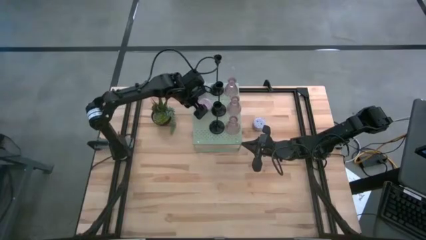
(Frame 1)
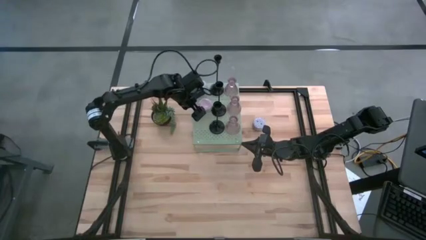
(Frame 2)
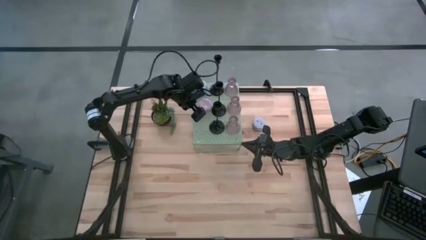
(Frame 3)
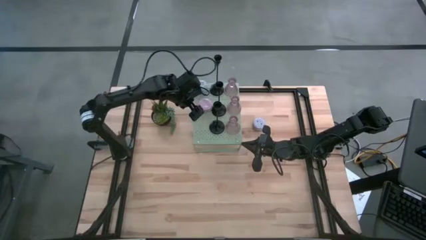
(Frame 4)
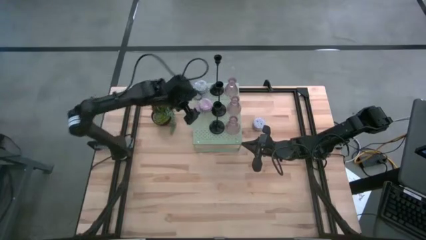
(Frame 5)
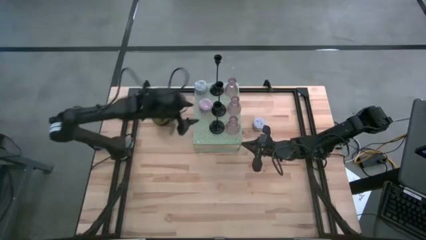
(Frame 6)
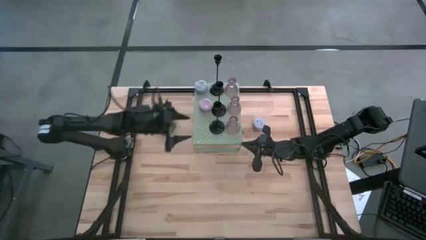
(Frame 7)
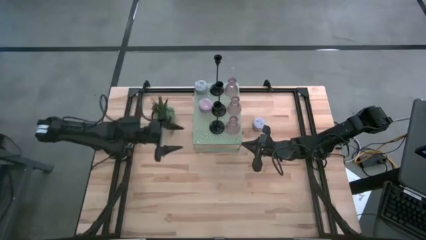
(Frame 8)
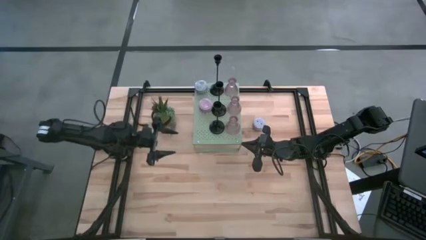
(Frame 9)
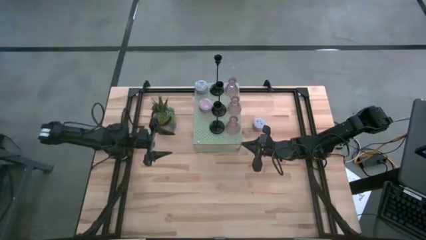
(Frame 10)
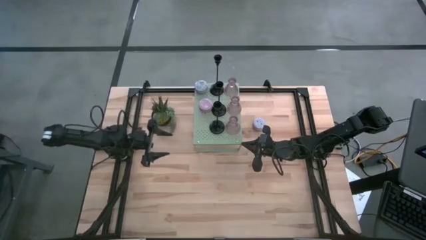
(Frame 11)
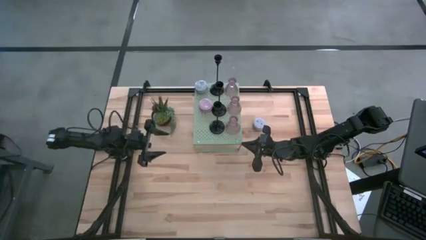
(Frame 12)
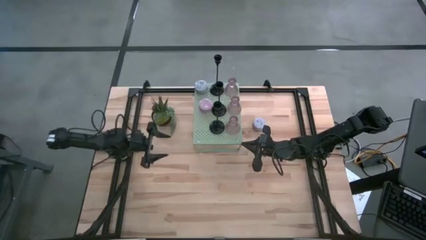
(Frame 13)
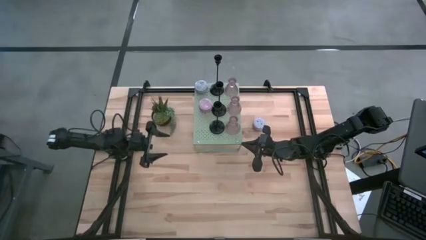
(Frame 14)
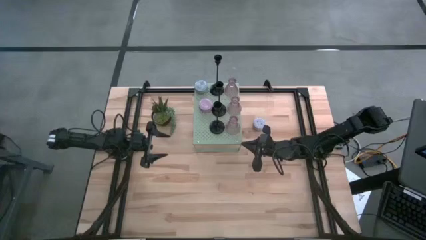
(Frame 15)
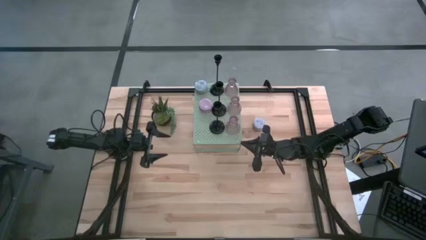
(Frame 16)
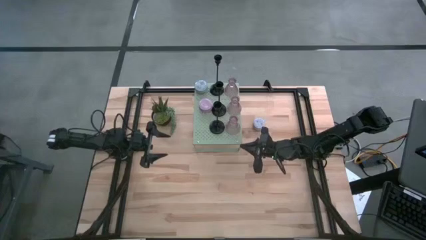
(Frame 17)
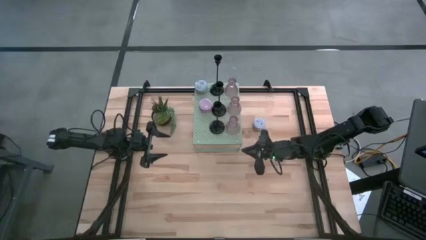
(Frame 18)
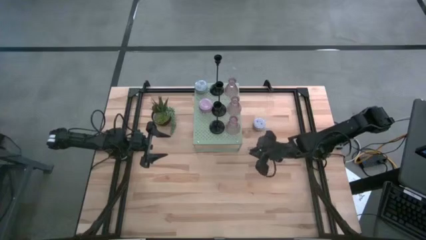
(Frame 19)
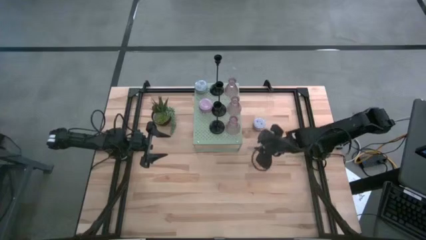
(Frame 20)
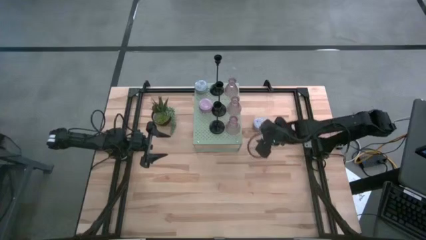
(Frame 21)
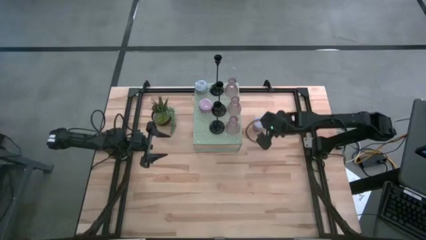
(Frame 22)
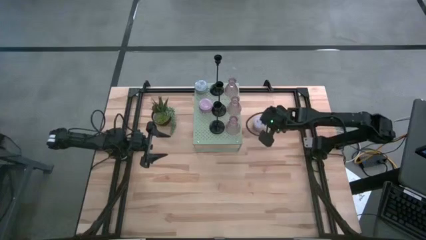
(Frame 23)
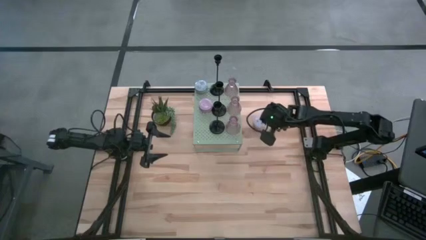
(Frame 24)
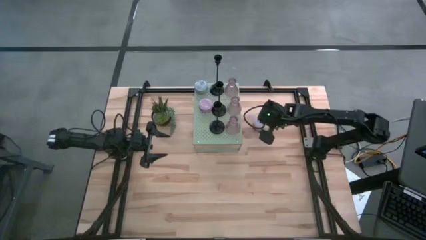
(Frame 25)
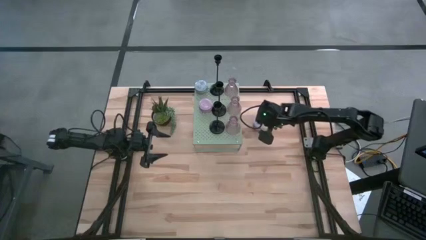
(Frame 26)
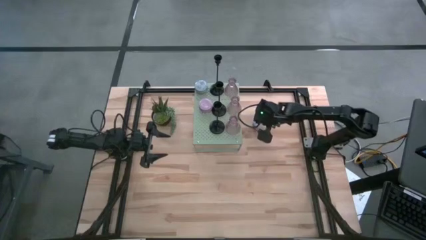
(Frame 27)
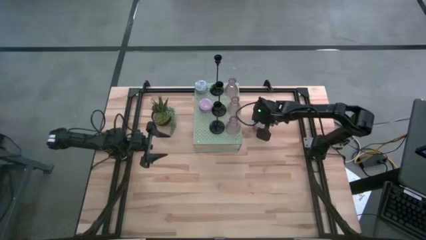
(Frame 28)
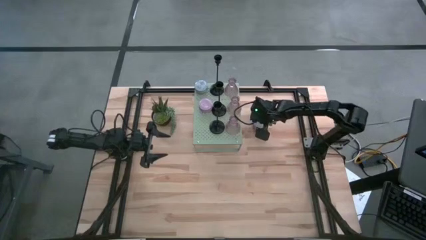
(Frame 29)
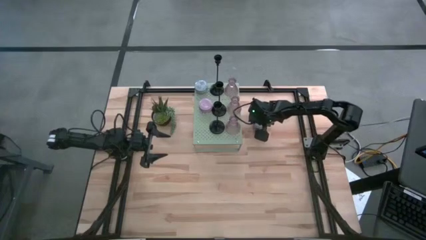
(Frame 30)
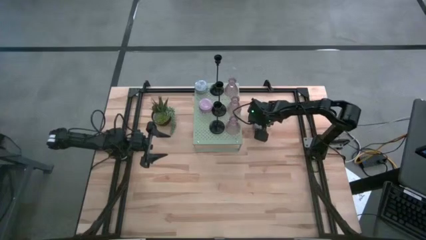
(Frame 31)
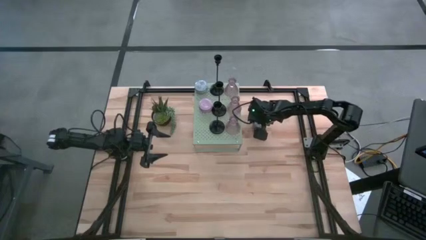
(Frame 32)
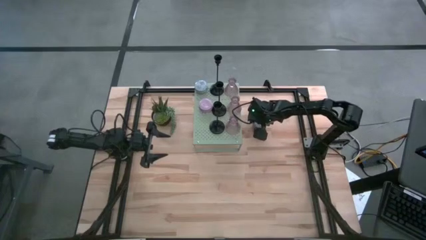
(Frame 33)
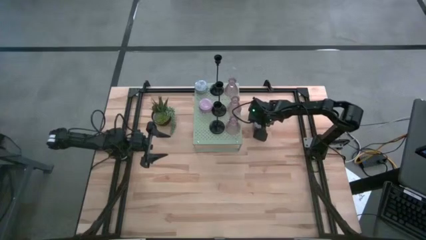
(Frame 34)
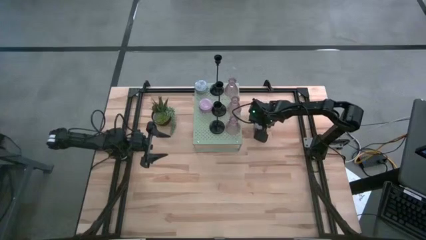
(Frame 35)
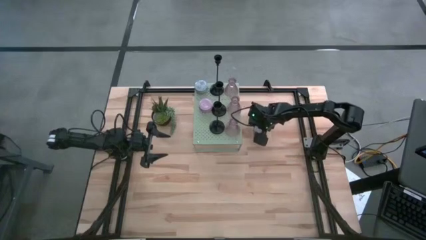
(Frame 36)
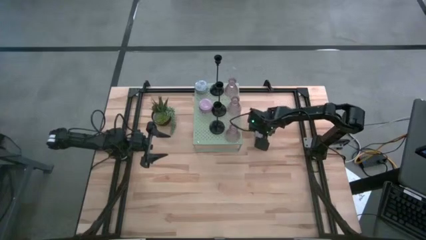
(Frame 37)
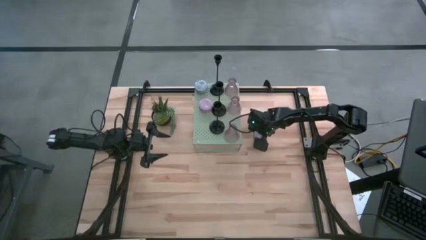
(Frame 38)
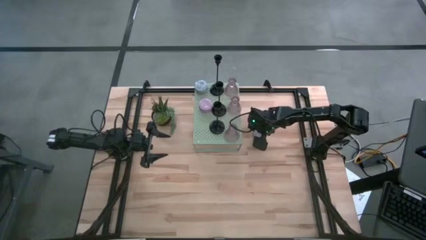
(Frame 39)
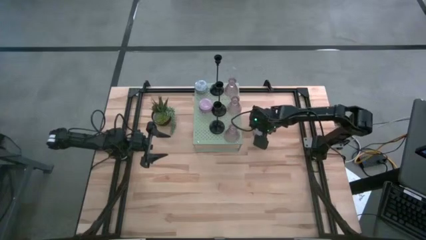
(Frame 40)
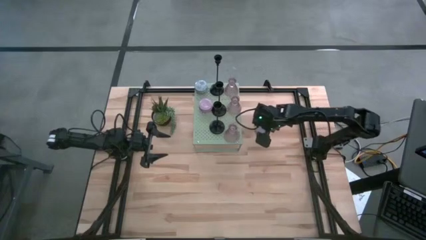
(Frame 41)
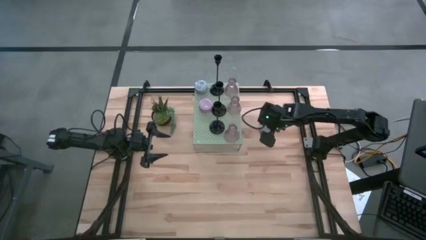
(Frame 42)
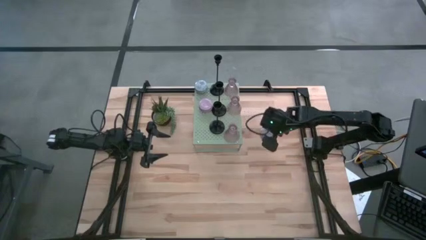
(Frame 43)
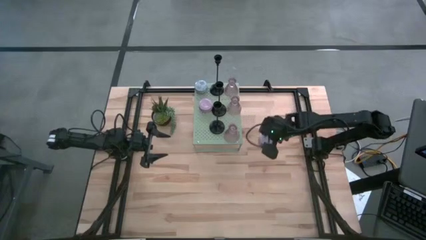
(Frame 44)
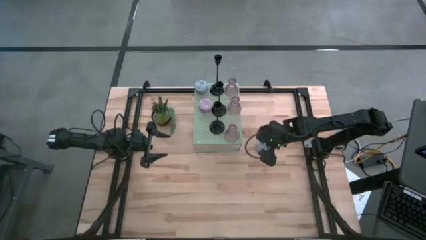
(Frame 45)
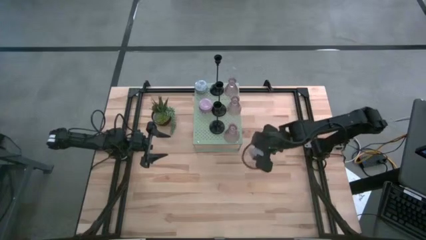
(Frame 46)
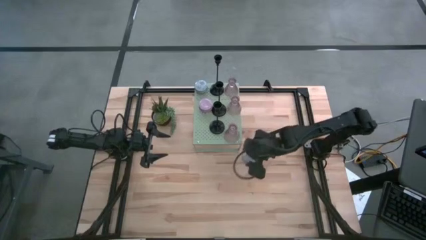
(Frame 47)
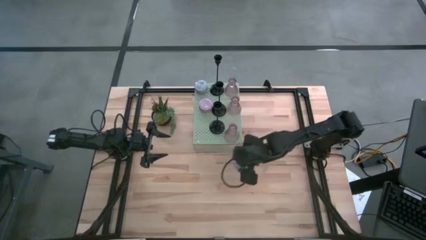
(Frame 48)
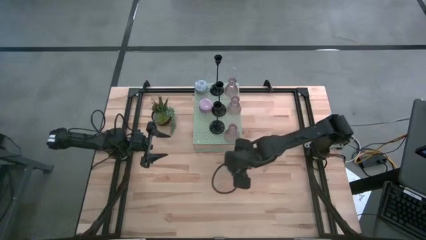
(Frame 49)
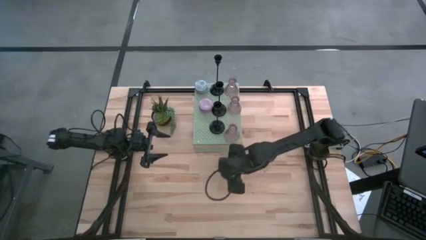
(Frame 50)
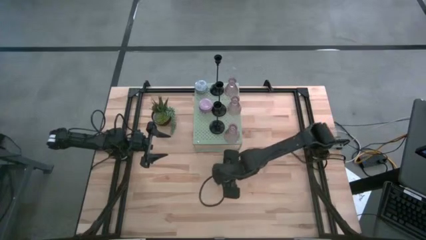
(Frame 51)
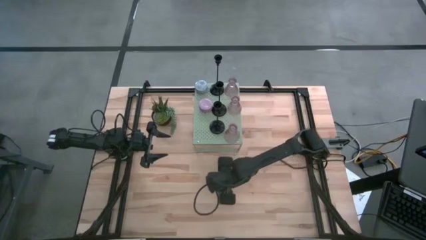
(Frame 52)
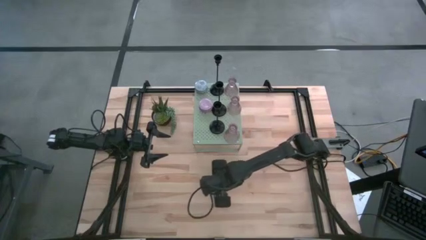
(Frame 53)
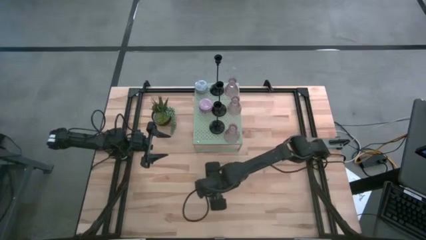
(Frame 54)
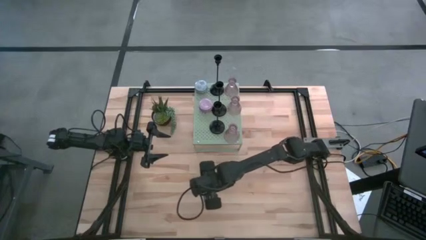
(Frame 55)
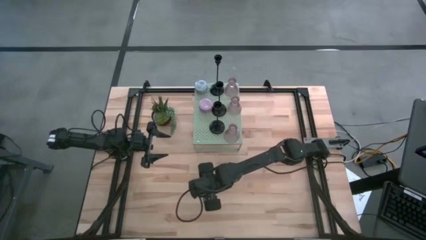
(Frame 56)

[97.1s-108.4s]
Task: Pick & Place candle stick holders
Put the red patterned scented candle on the shelf

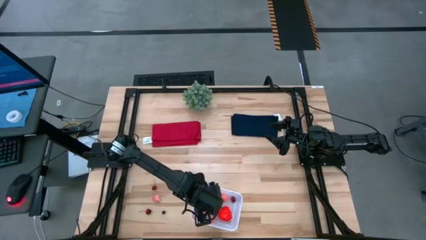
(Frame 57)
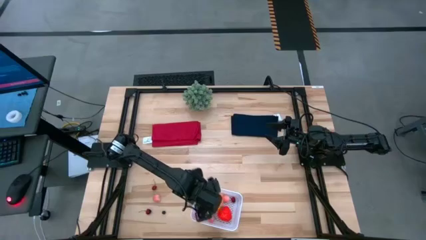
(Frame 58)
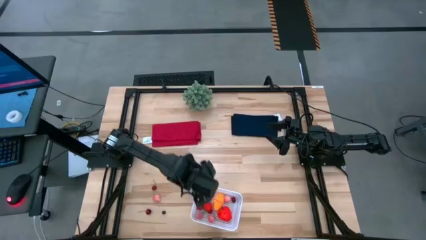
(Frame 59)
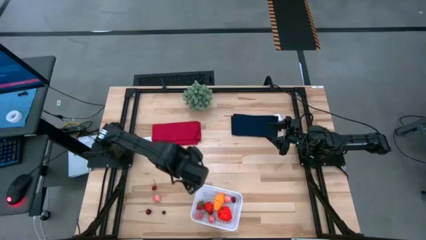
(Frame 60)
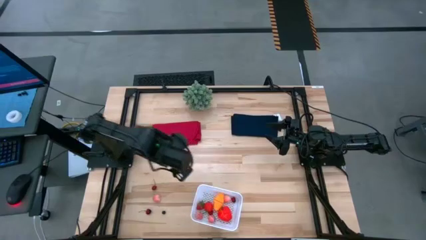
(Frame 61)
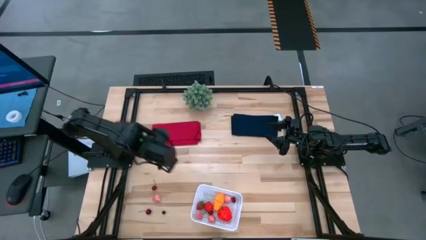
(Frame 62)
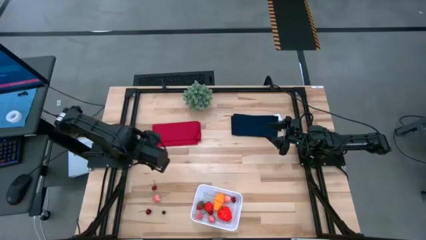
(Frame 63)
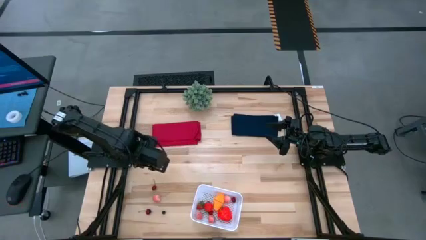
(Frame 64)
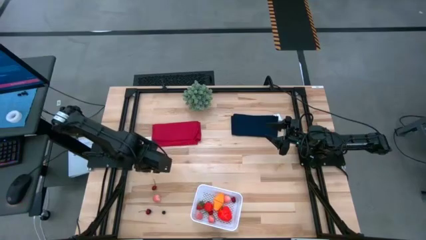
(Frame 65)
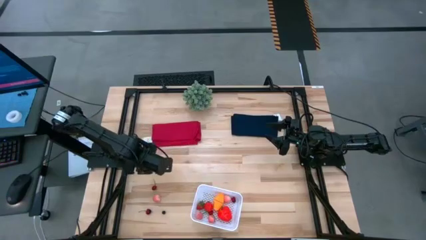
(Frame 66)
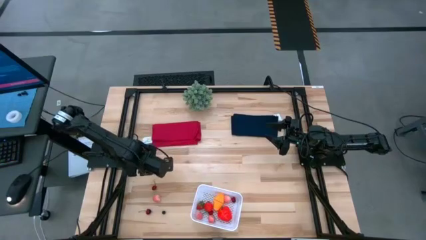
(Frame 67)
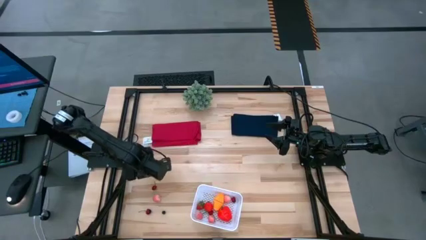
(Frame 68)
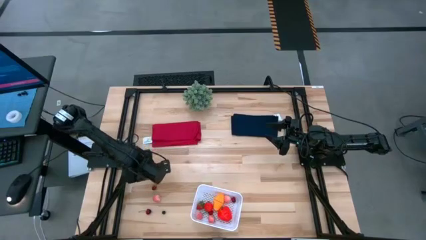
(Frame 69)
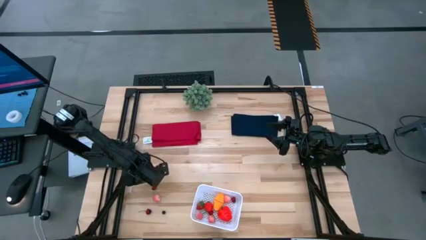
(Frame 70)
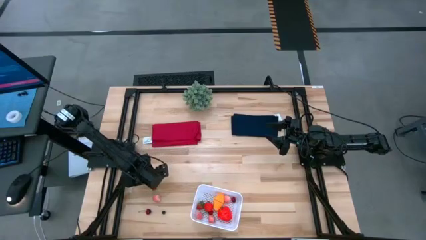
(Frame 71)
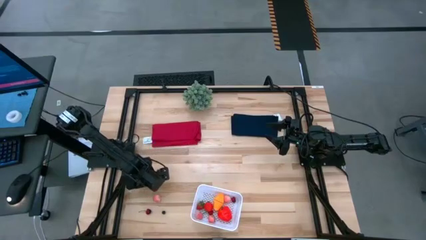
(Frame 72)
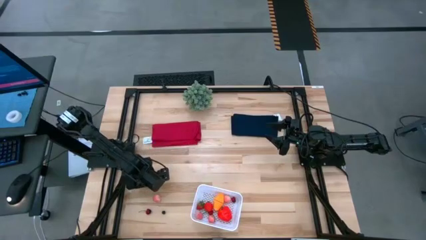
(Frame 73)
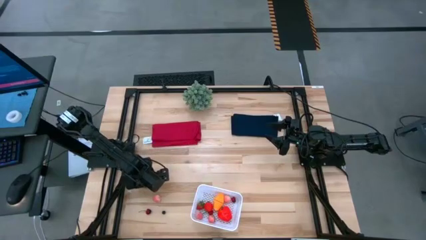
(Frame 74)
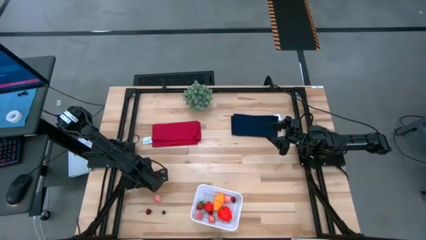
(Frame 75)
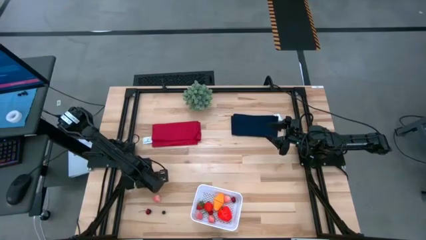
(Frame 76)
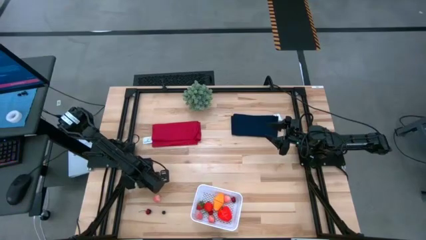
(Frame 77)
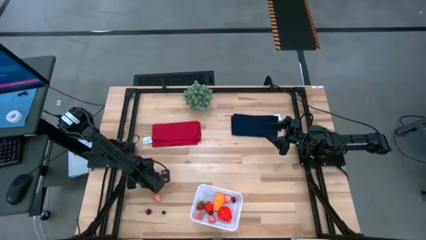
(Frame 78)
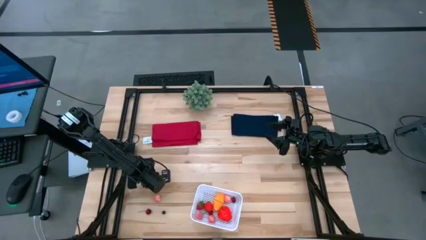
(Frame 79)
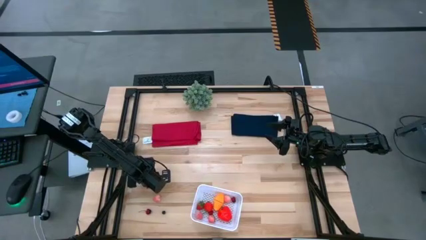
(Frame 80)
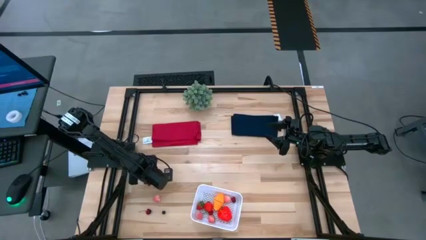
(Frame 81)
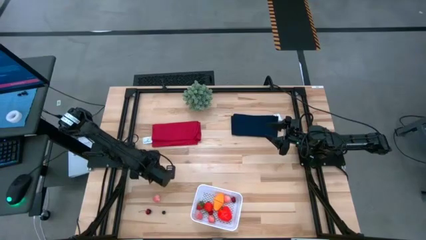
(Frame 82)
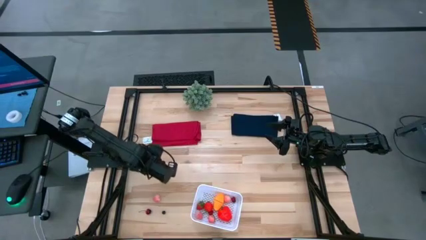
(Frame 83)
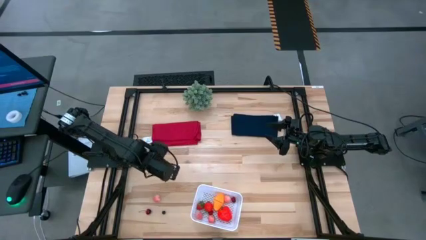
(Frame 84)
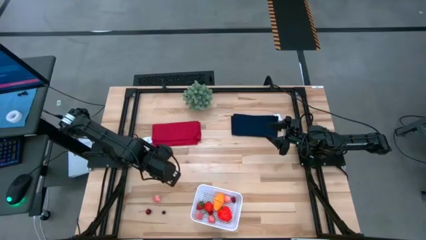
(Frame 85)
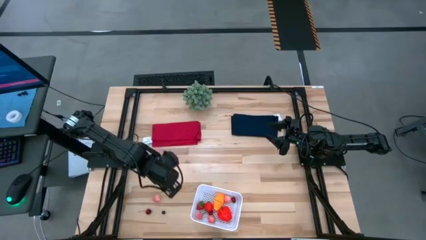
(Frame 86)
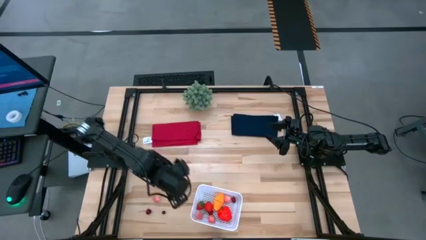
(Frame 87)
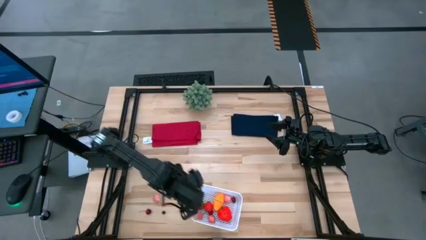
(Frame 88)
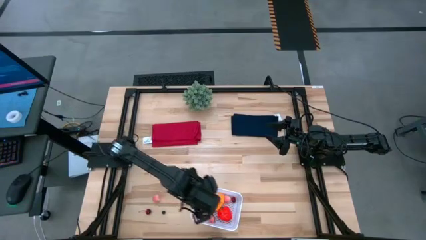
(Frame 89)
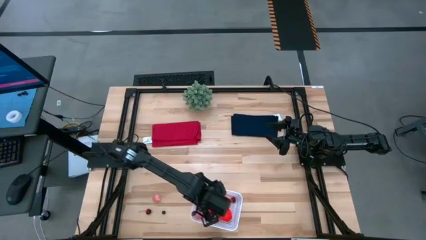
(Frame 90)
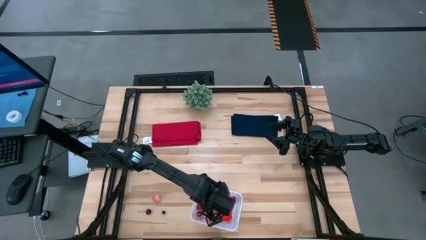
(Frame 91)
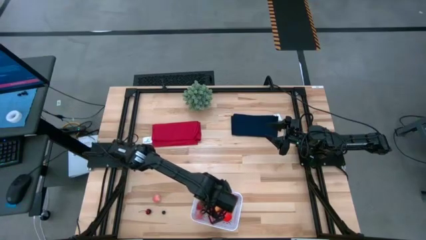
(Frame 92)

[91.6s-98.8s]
Task: Pick and placing Produce into tupperware
Put the top cherry into the white bin
